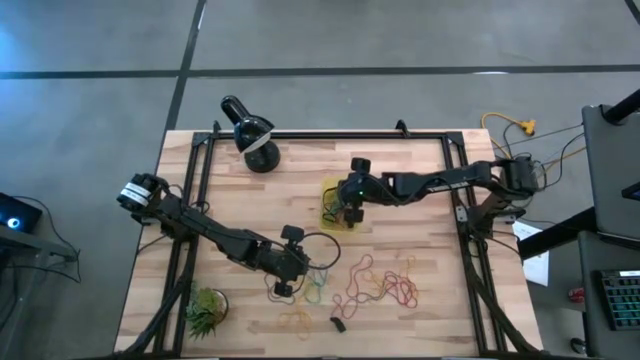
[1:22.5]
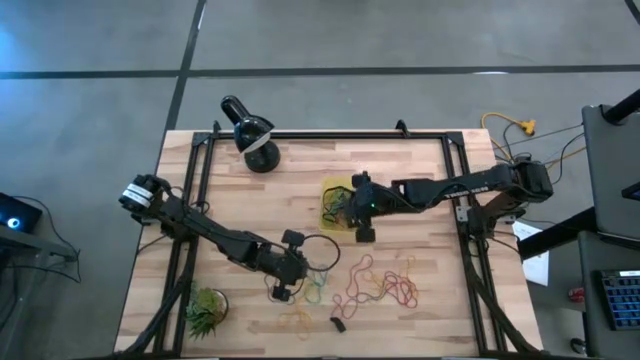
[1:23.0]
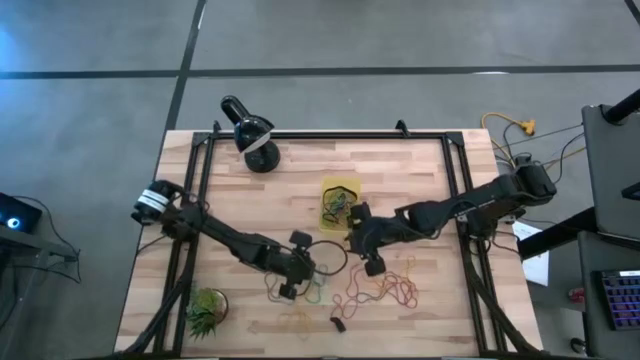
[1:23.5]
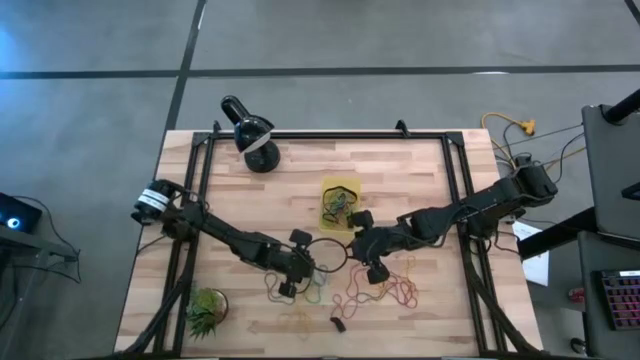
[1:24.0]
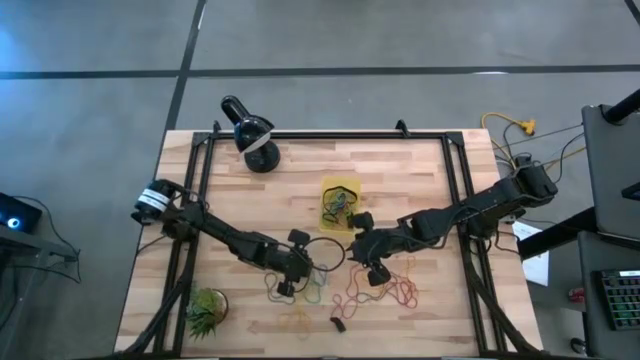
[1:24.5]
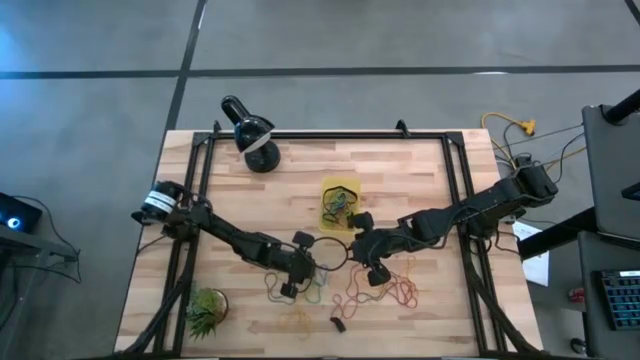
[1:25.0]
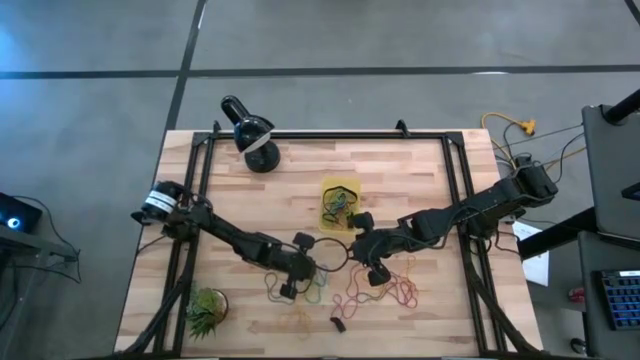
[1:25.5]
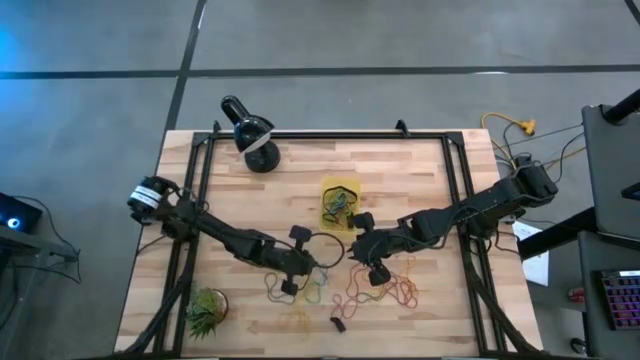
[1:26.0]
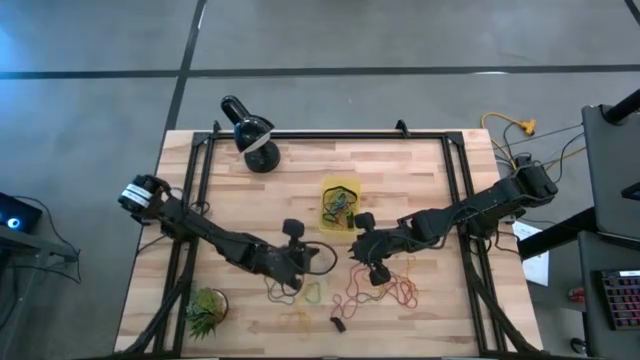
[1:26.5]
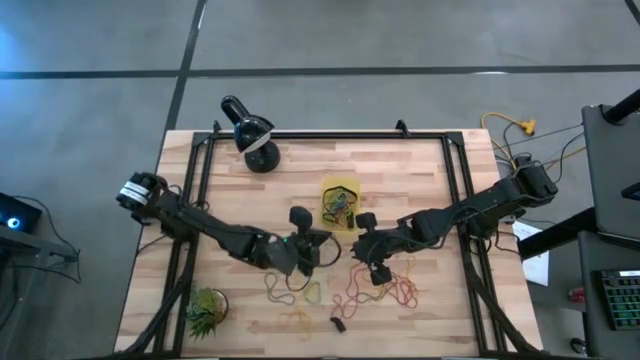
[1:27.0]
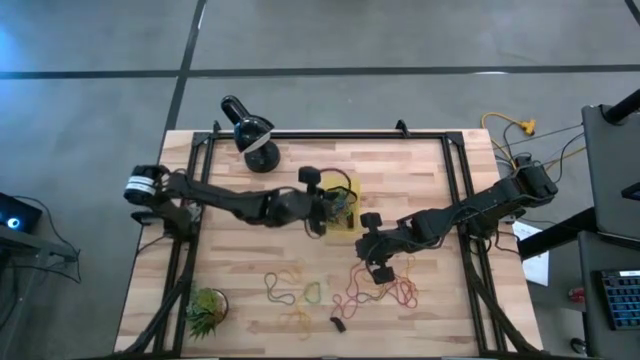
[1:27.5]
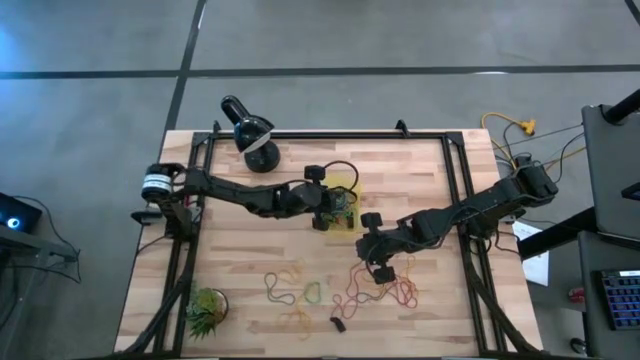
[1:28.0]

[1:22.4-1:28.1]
Task: Pick and place rubber bands into bin
Put the blue rubber band into the yellow bin

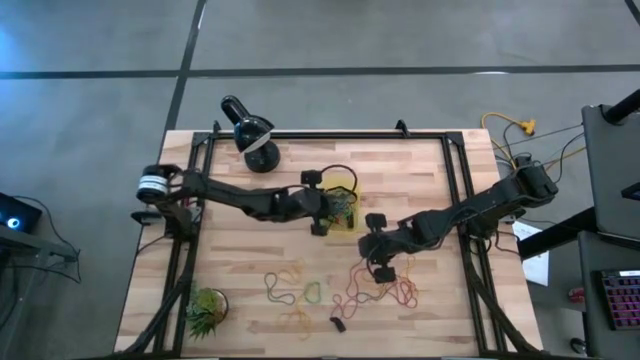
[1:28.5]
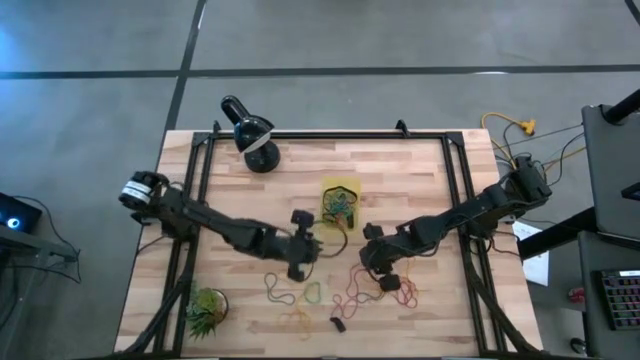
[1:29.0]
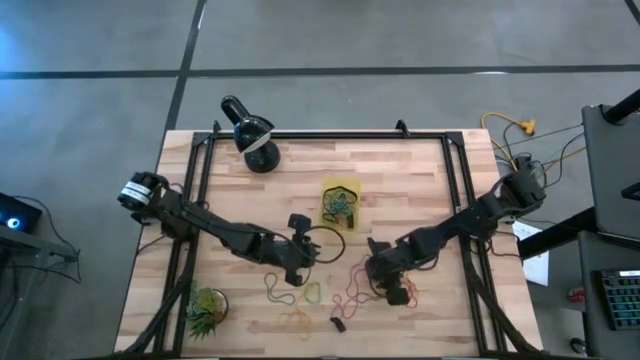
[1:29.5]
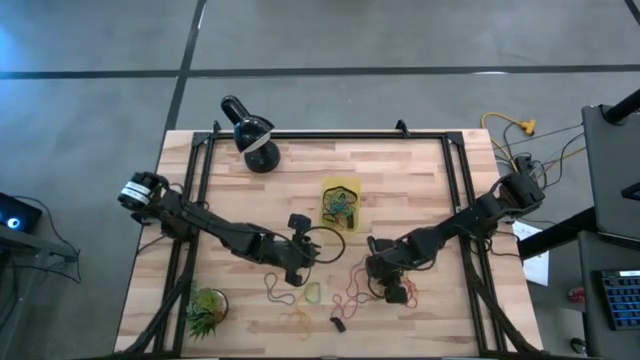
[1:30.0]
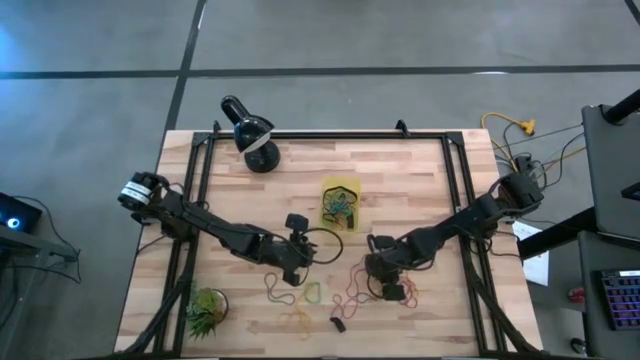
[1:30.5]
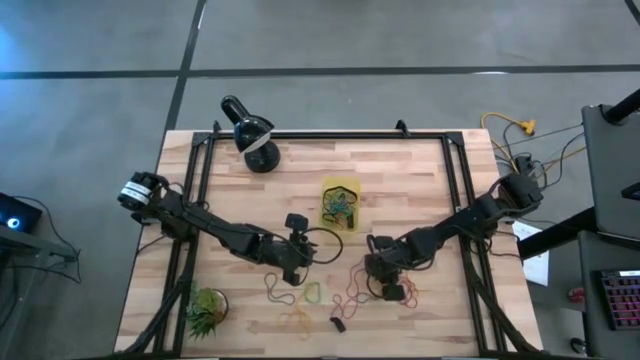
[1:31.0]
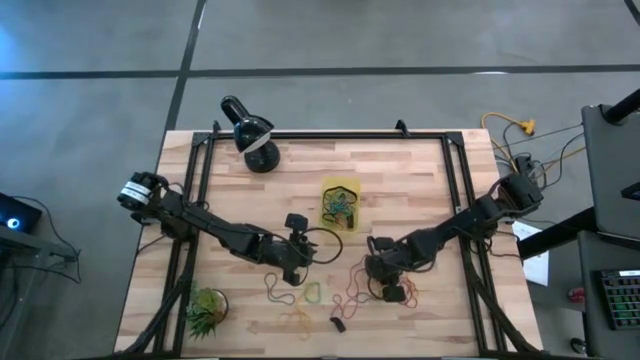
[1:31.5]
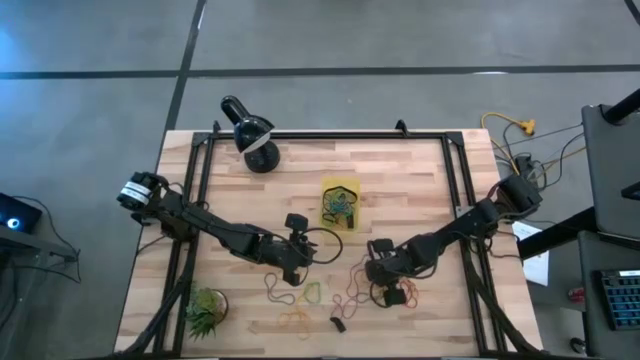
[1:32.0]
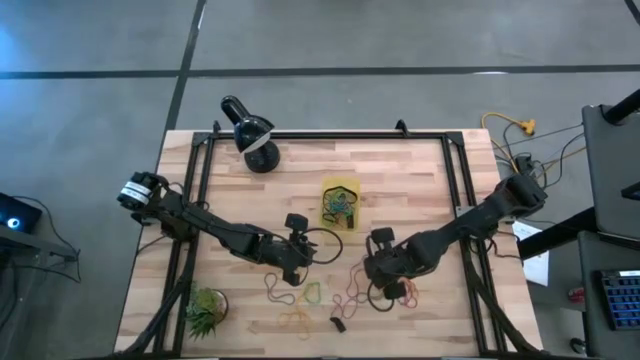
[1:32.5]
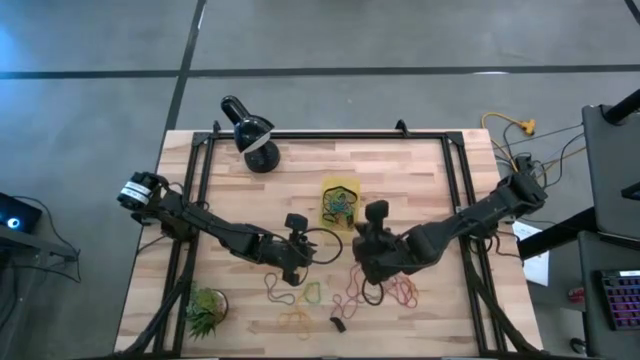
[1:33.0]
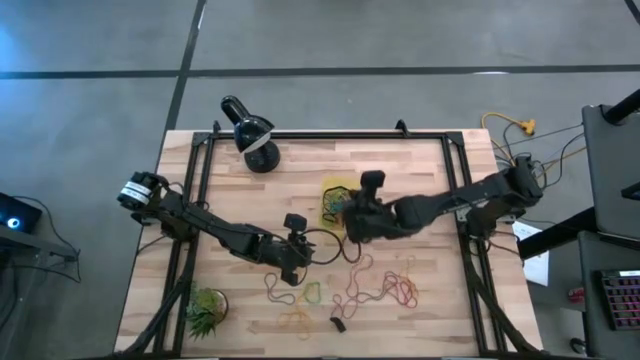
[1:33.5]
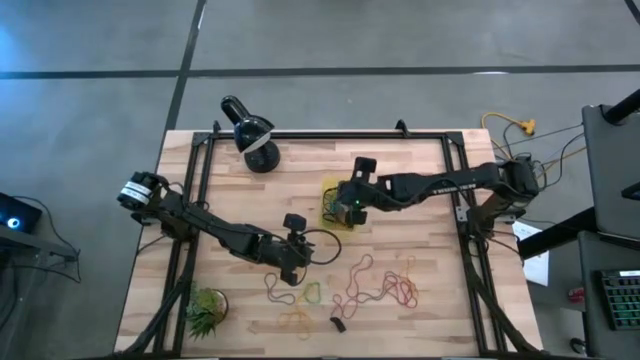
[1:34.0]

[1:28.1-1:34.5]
Put the yellow rubber band into the yellow bin

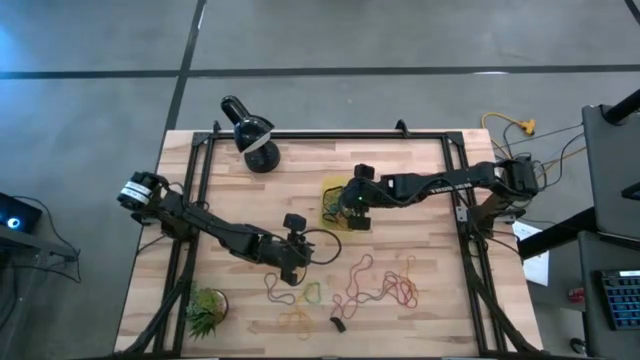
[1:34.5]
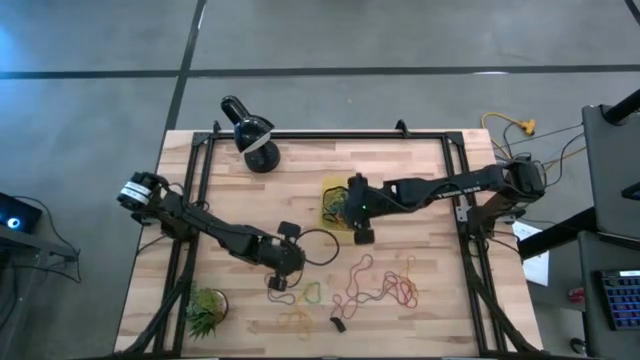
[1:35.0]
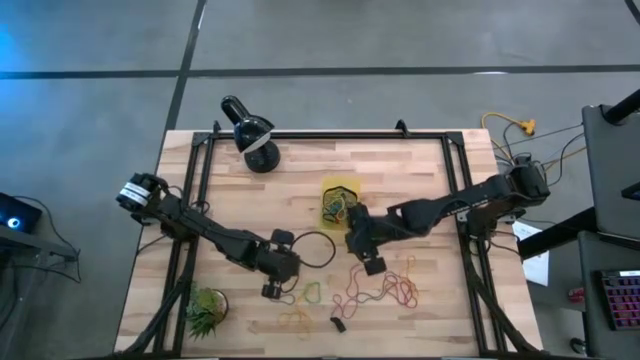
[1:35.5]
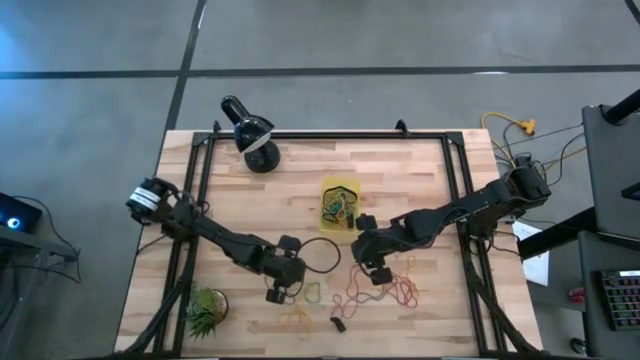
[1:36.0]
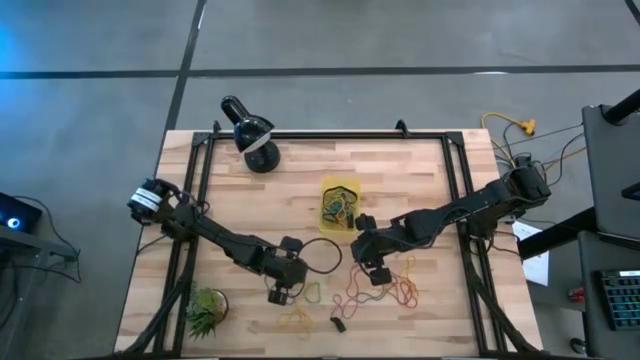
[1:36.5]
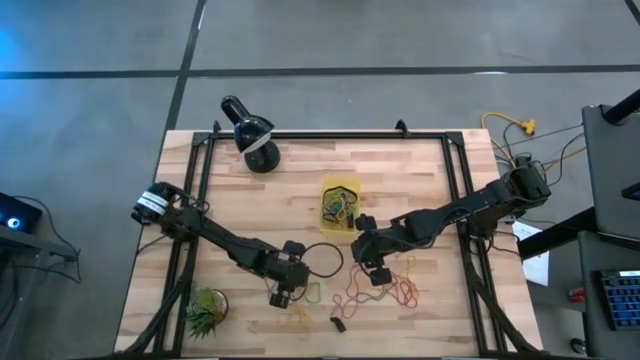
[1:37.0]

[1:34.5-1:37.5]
Put the yellow rubber band into the yellow bin

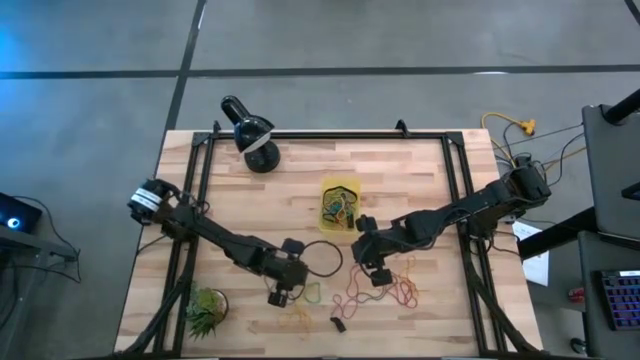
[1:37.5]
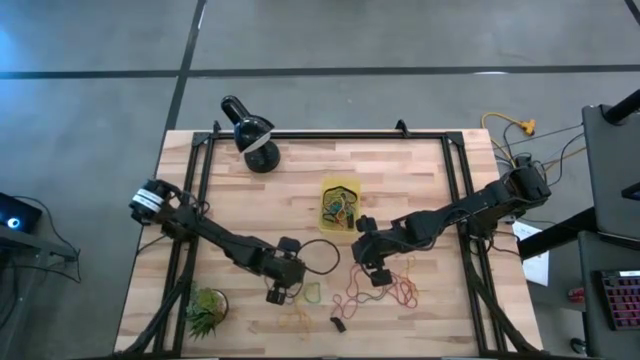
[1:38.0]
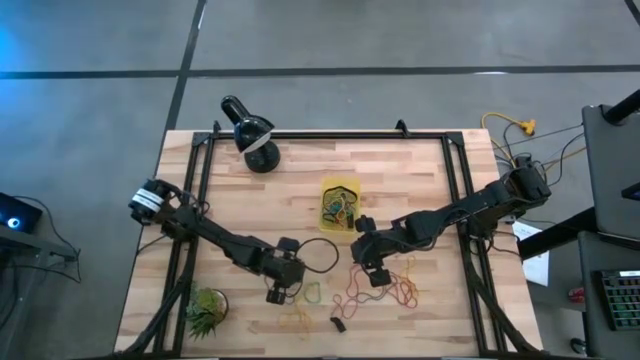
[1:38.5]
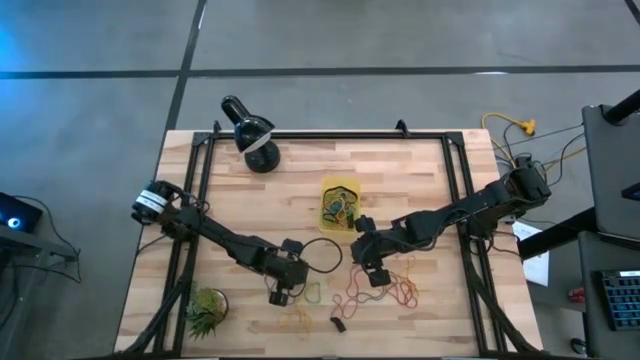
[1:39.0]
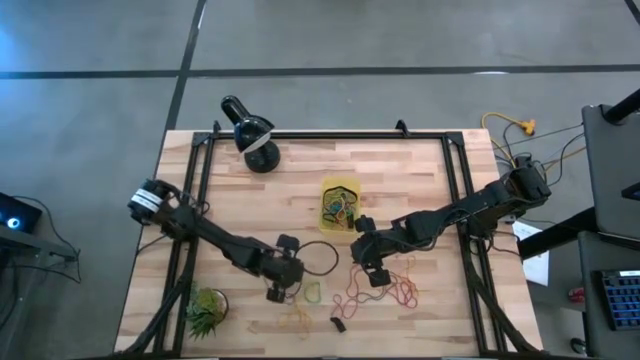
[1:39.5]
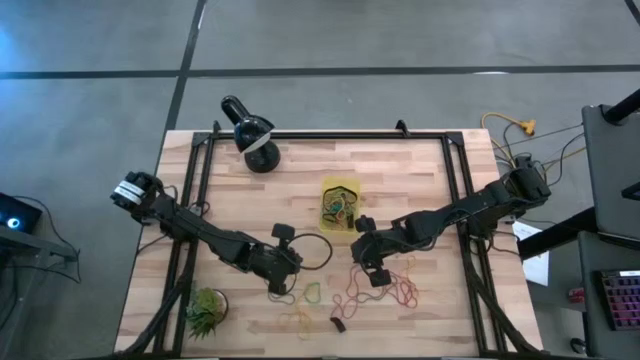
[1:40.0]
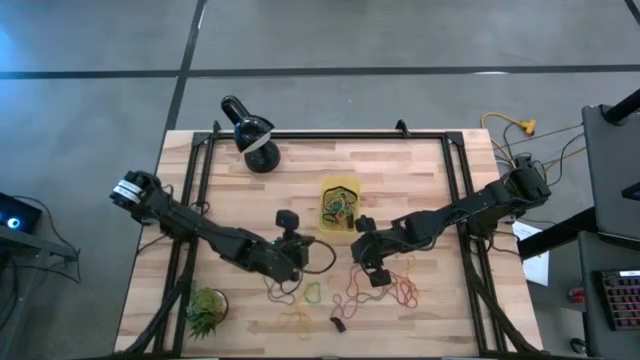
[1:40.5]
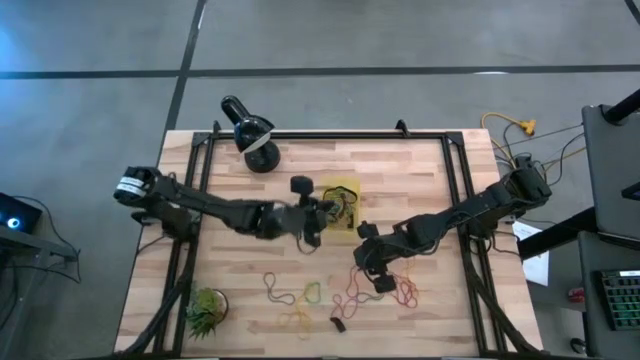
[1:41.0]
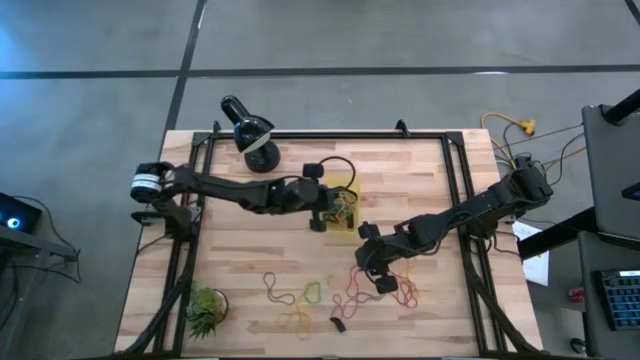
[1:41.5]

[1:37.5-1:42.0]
Put the yellow rubber band into the yellow bin

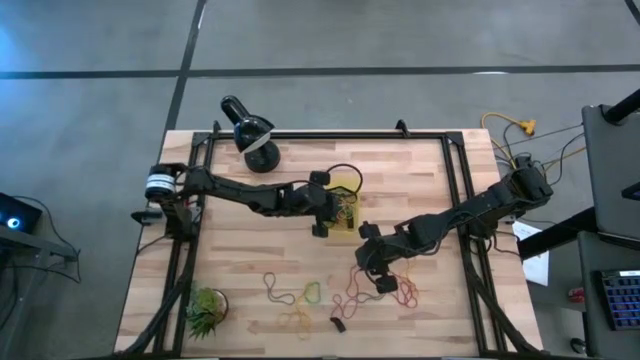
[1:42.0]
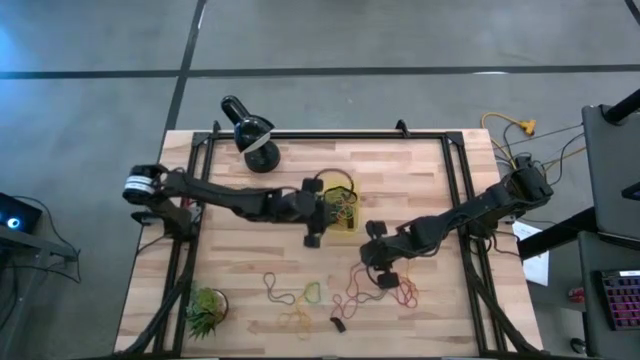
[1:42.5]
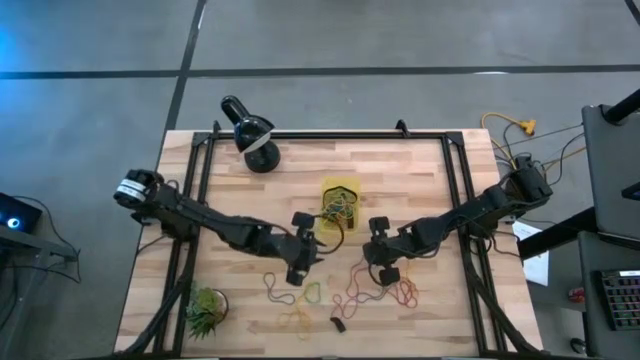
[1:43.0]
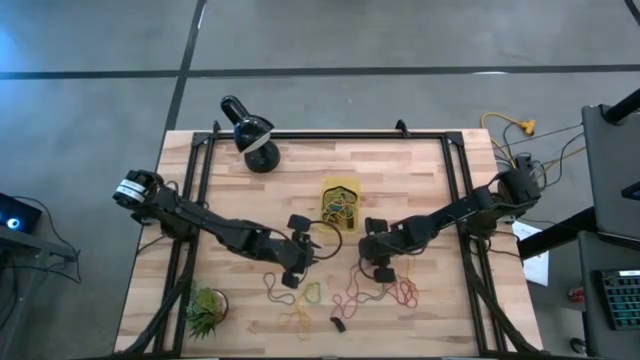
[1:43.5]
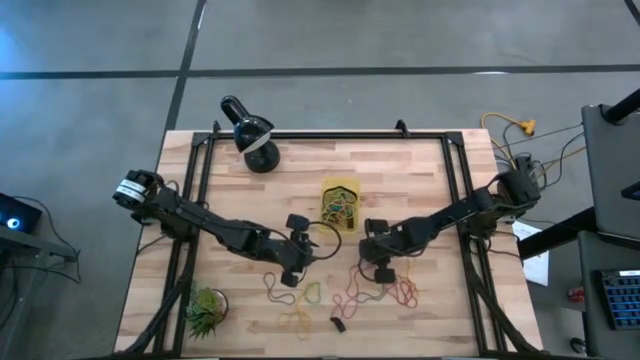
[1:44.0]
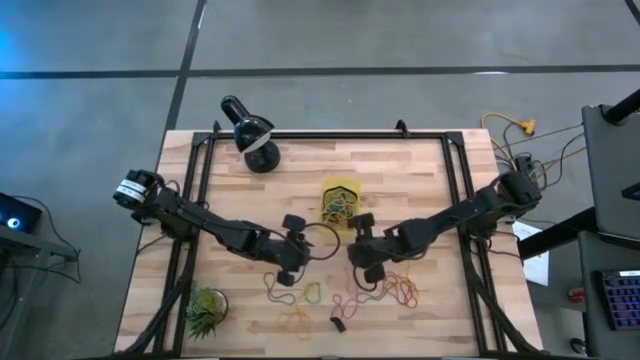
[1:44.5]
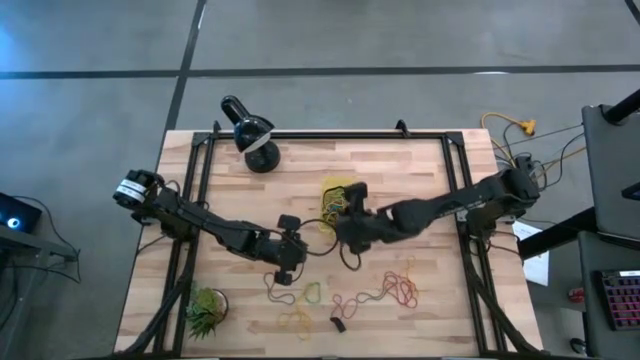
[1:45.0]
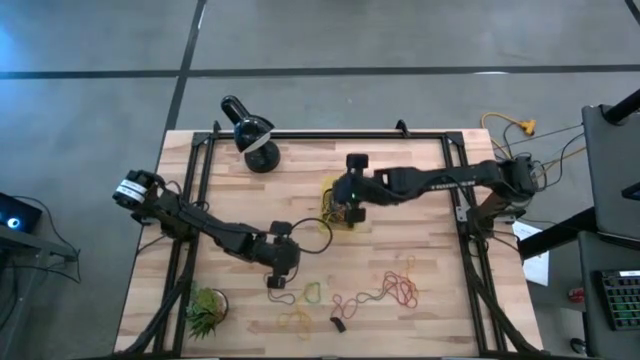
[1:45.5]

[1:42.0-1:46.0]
Put the red rubber band into the yellow bin
